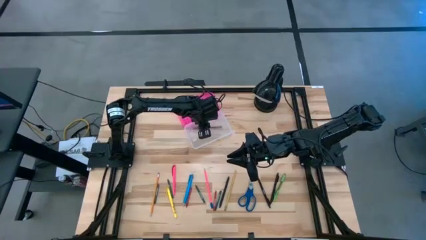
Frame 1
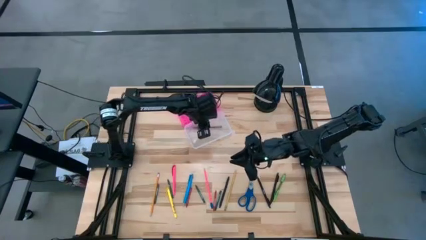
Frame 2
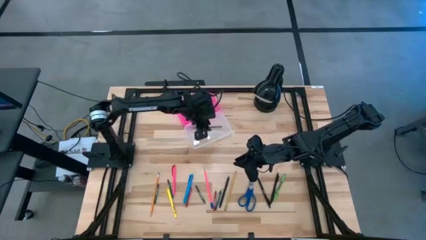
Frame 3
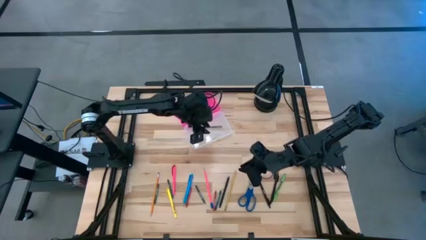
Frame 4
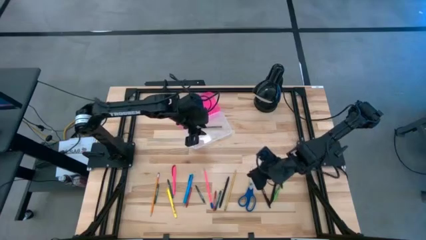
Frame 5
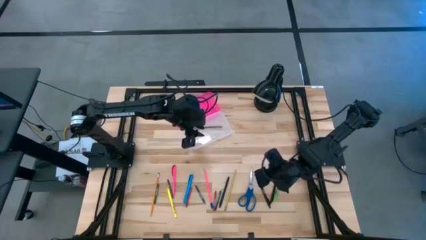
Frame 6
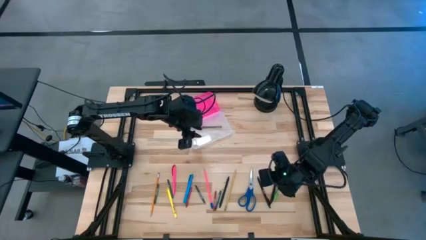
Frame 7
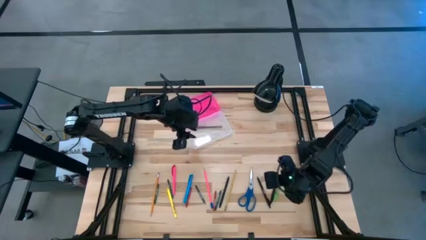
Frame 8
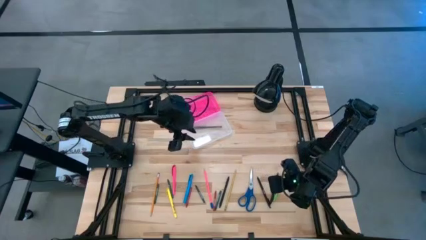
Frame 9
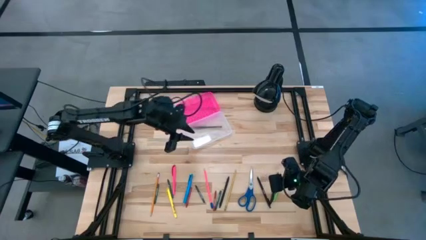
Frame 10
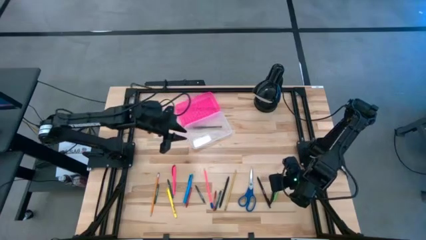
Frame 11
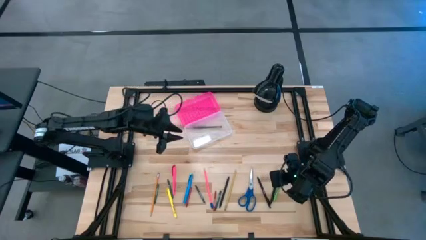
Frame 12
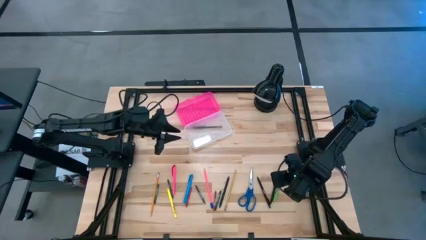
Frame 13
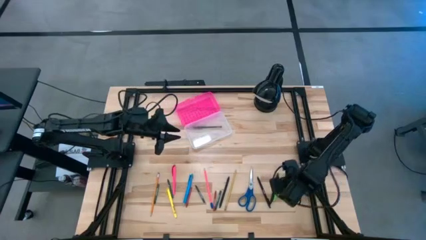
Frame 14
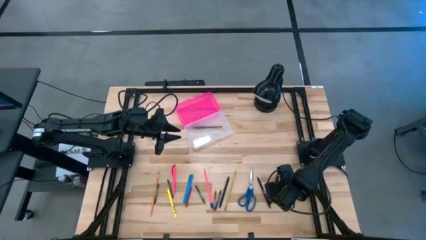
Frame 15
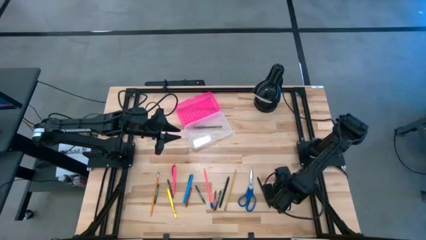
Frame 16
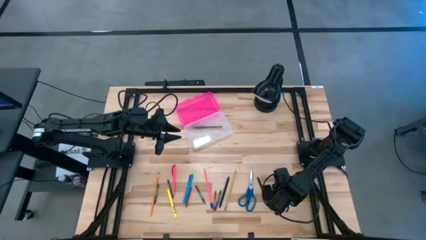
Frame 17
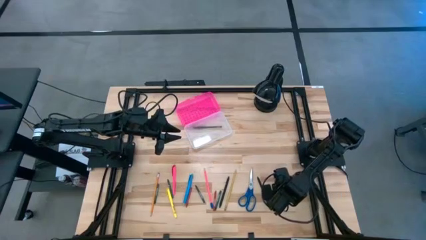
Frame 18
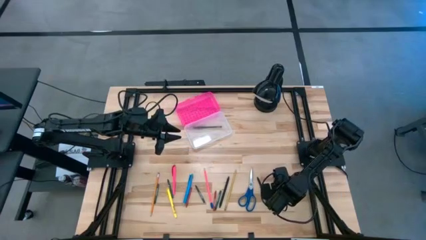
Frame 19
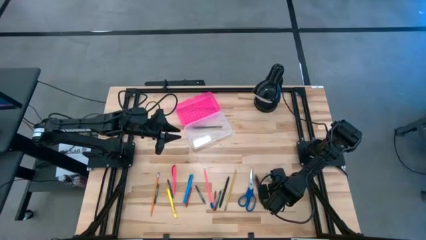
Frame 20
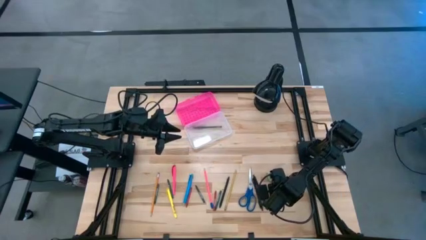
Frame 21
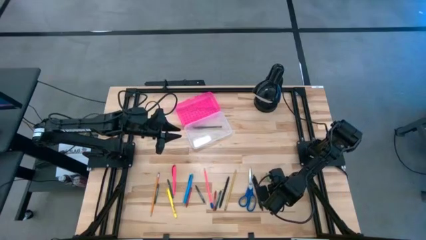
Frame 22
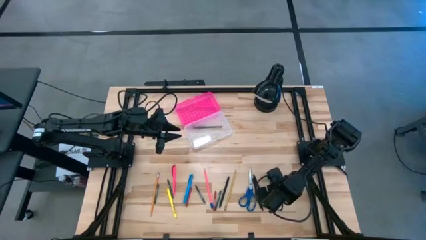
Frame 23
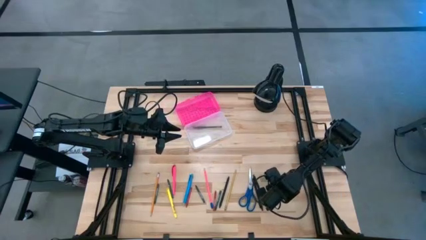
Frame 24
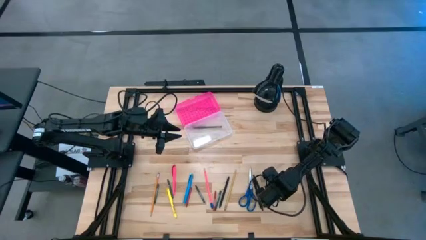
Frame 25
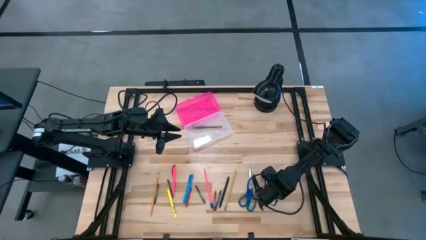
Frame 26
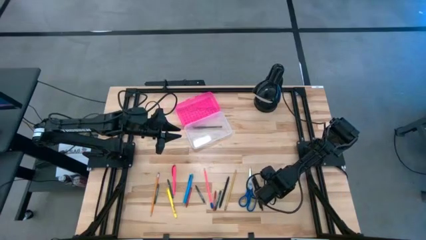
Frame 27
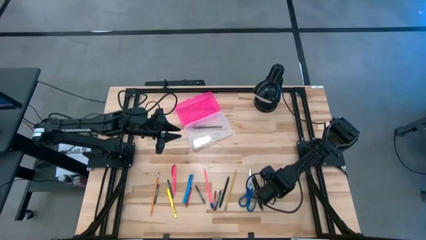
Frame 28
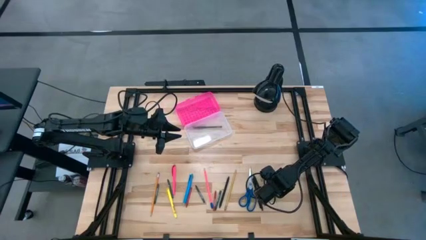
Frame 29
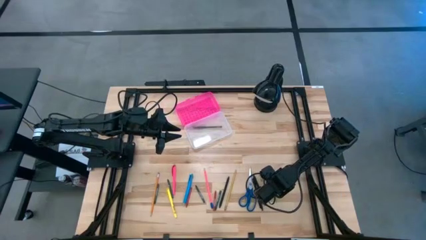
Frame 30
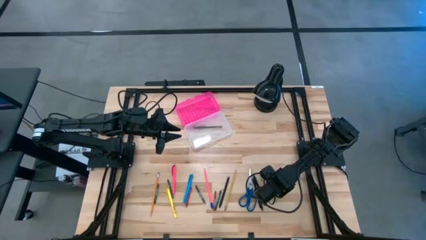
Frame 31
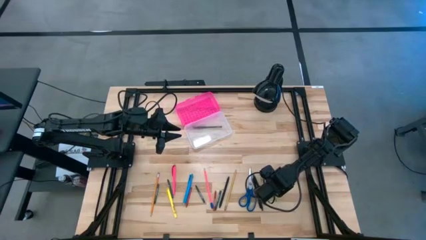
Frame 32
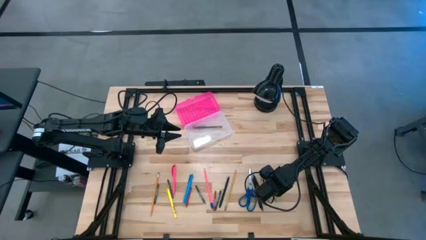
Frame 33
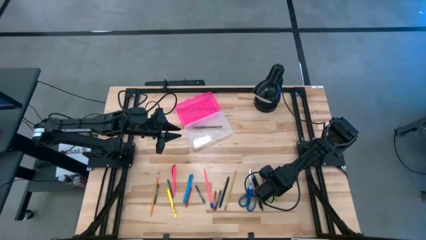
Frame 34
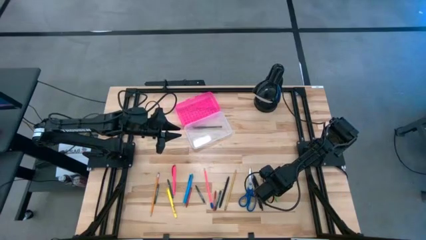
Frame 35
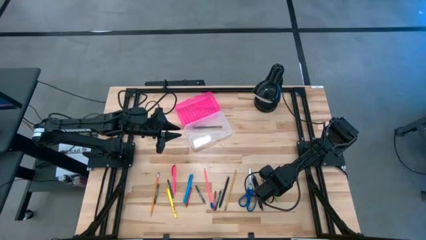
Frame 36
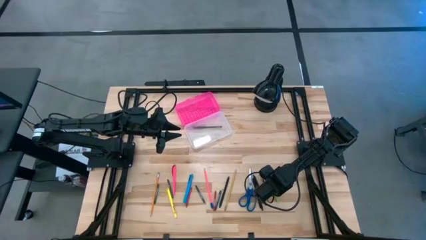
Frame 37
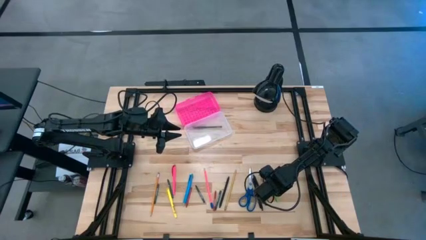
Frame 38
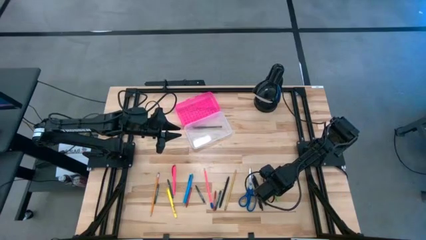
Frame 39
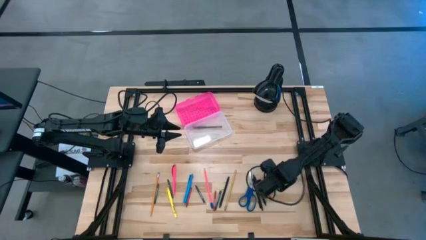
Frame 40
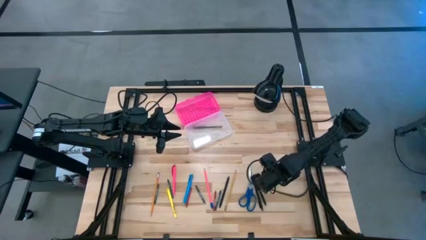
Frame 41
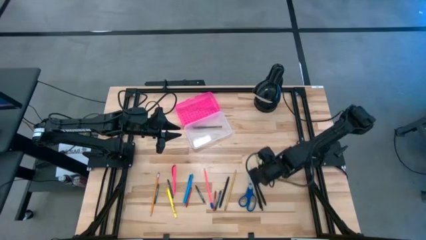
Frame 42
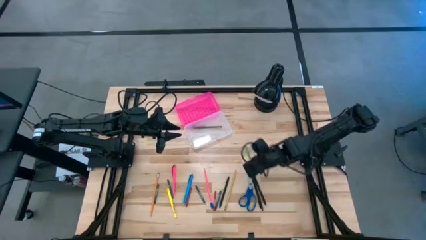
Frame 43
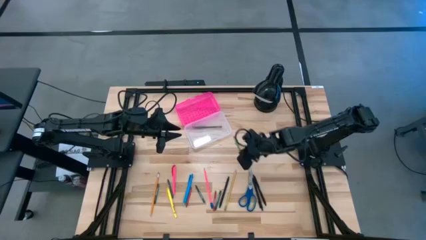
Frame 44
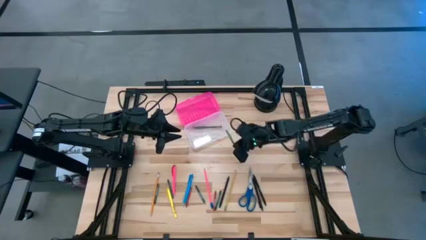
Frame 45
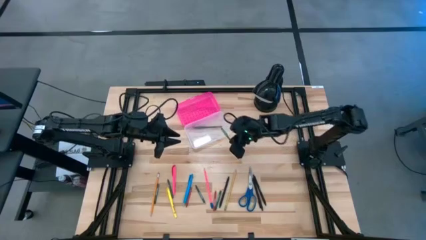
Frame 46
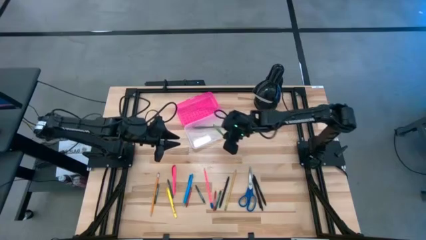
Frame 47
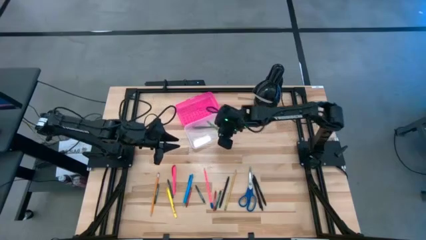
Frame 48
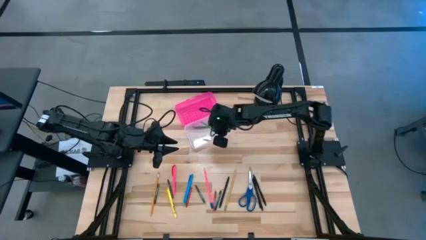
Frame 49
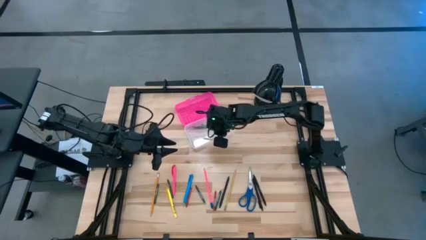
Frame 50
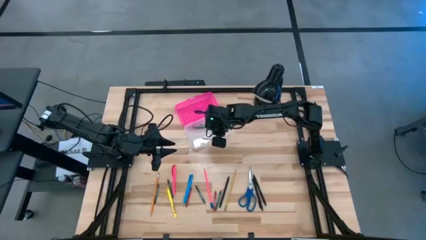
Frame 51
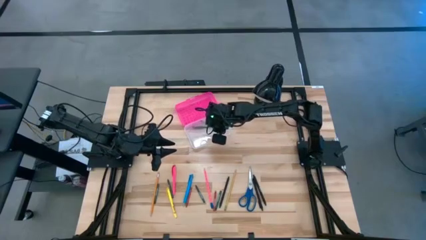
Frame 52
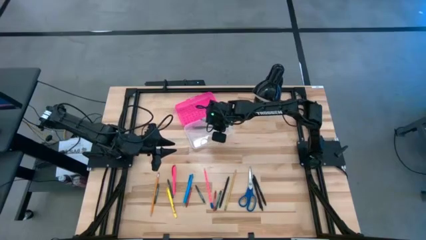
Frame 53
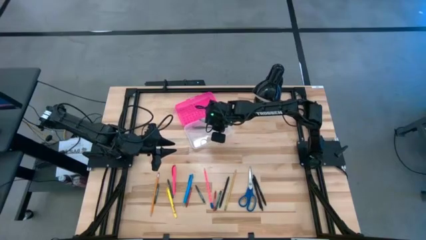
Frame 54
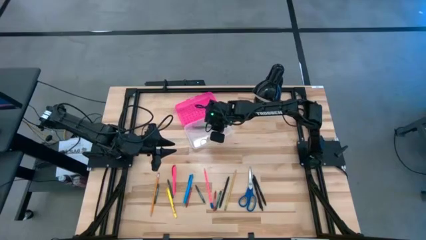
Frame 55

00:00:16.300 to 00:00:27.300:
Task: Pick & place school supplies into a supply box
Put the green pen into the pink supply box

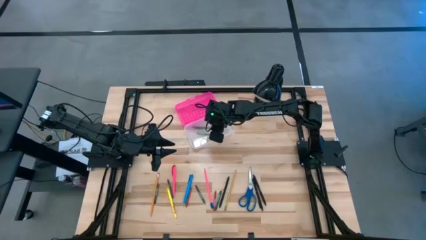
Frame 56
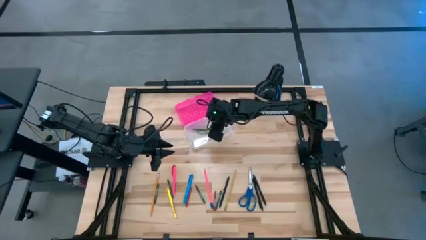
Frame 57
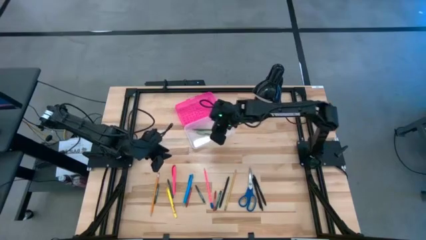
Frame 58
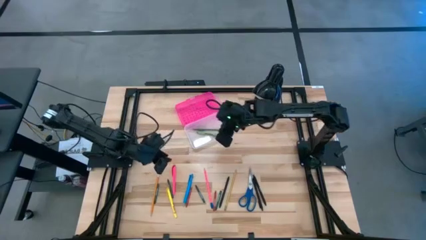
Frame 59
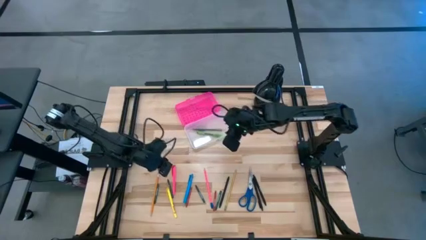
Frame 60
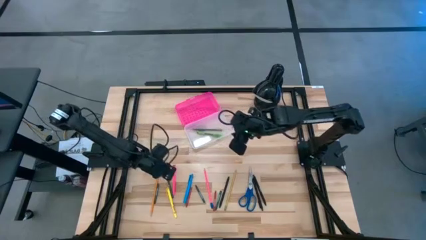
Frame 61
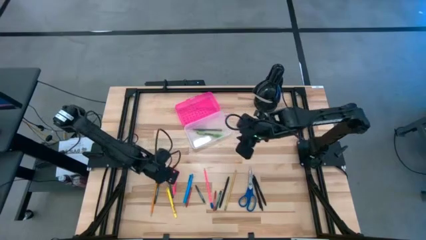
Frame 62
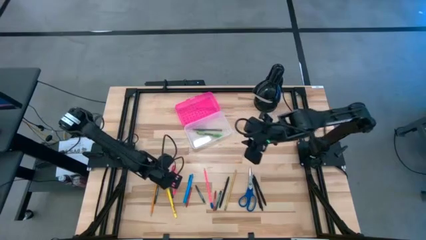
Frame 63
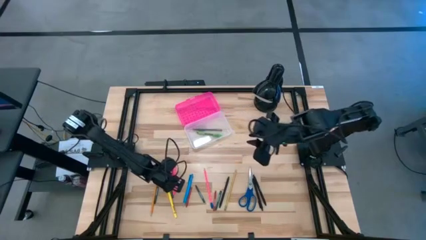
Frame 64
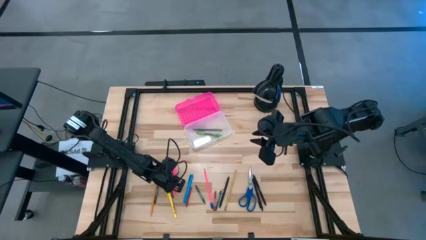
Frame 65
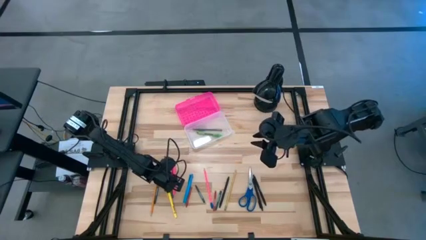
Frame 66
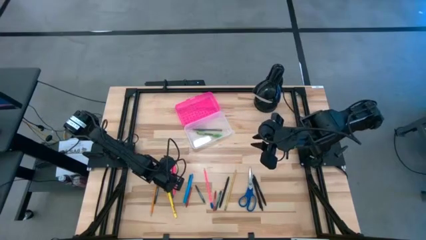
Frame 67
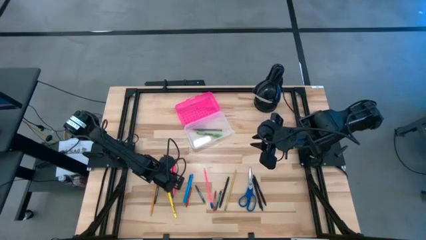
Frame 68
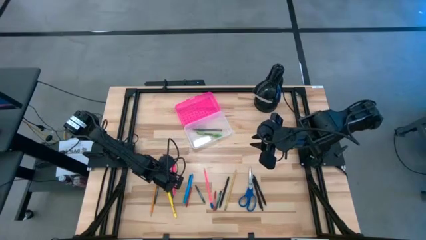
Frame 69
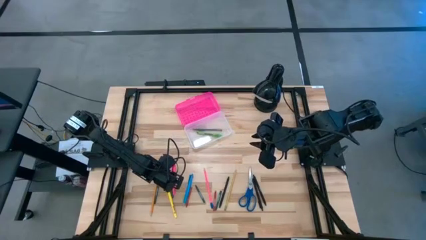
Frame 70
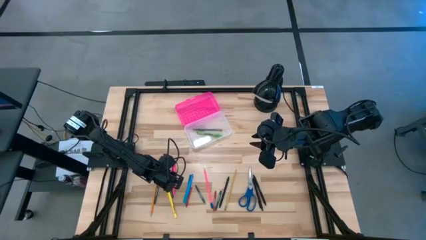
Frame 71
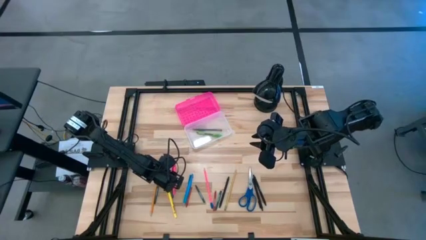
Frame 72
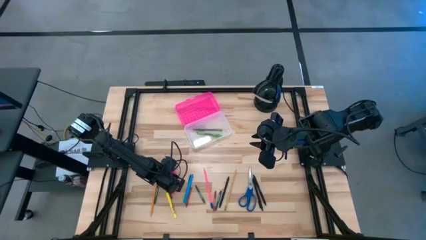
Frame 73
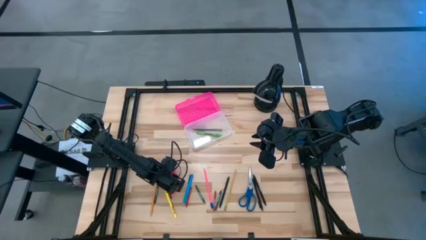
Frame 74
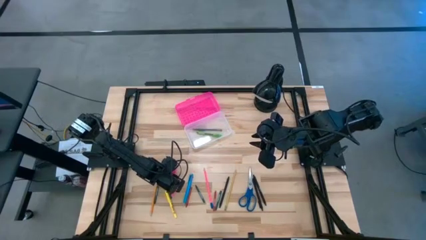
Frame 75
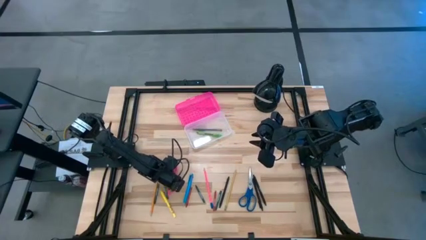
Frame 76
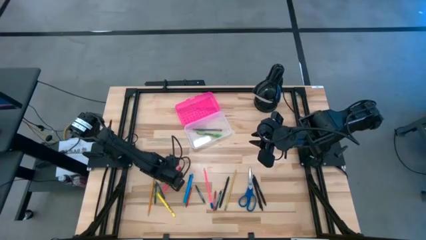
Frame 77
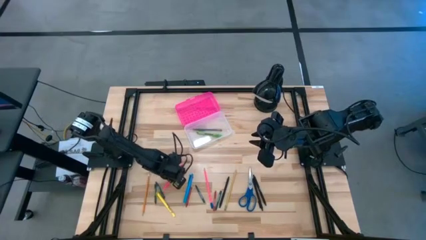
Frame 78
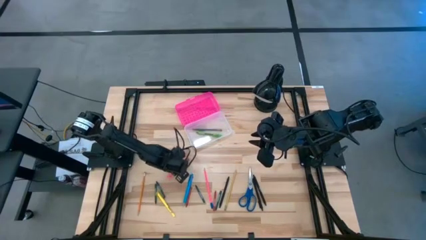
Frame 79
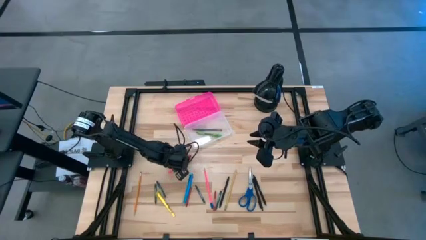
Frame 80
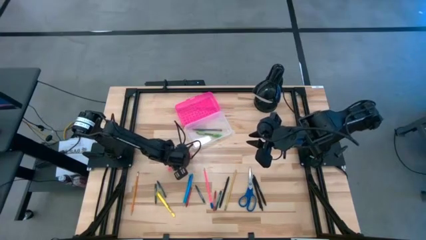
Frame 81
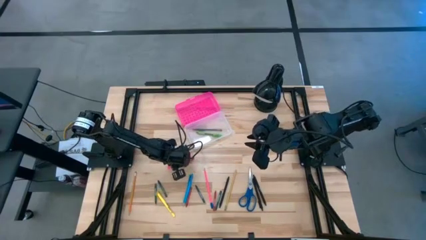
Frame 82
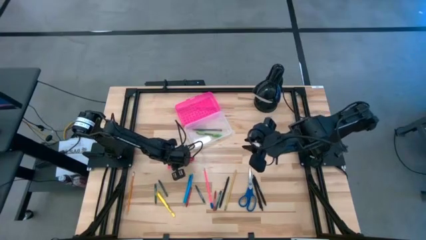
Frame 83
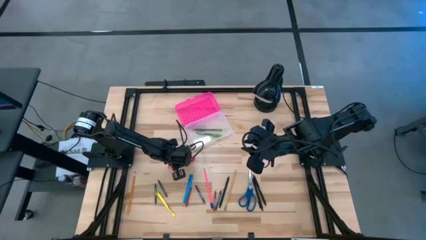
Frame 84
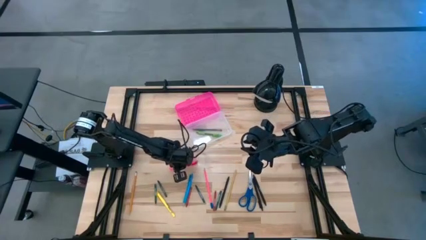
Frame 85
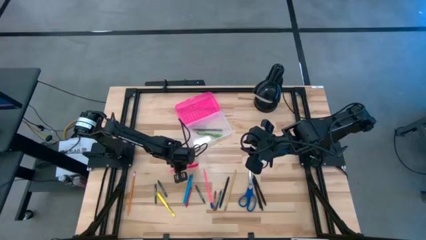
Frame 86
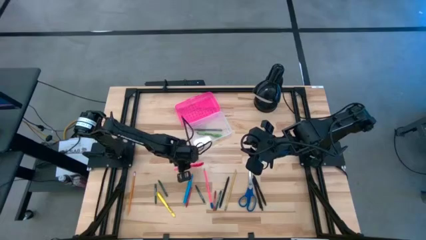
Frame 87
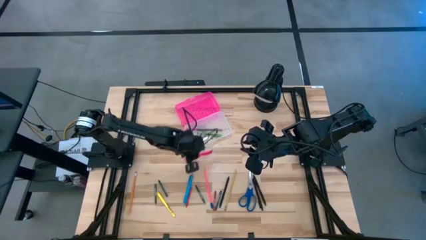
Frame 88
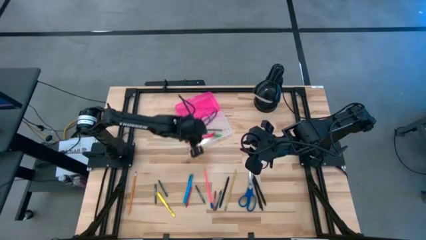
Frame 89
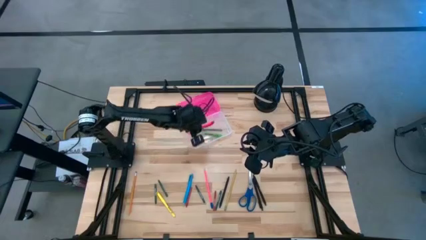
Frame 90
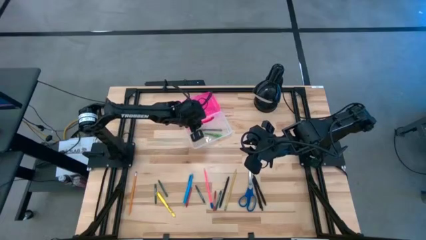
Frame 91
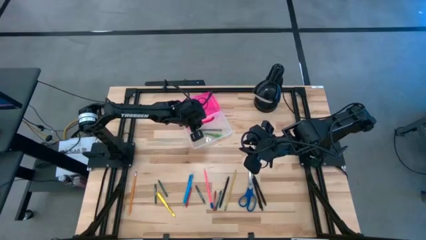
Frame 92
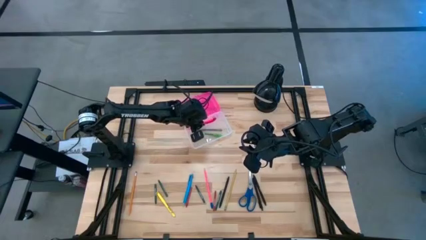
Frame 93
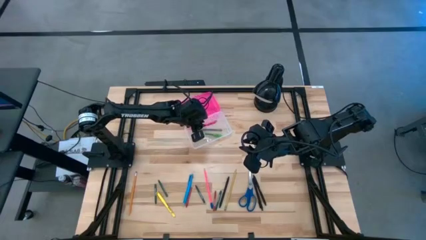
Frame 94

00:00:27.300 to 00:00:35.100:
Put the pink pen into the pink supply box
